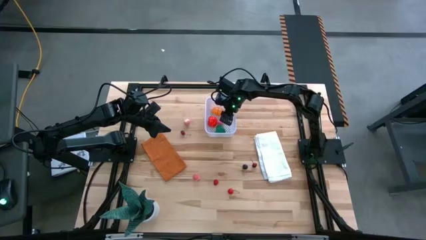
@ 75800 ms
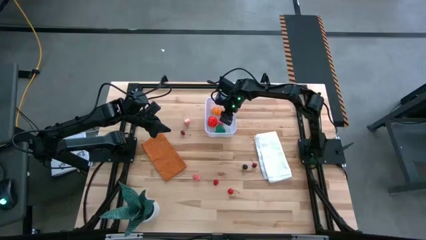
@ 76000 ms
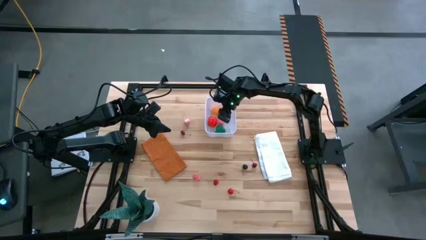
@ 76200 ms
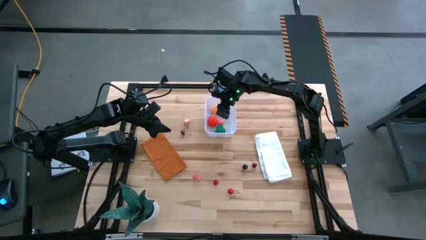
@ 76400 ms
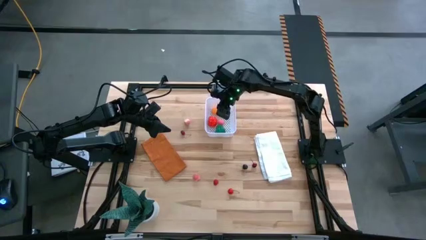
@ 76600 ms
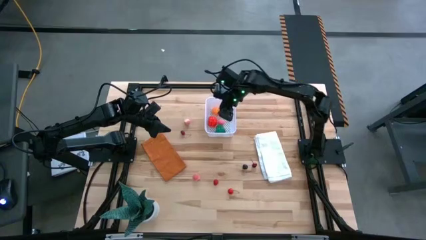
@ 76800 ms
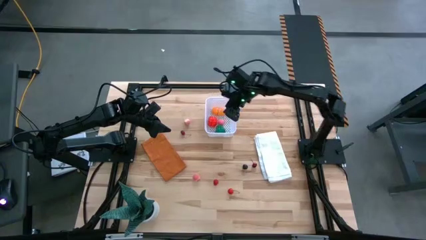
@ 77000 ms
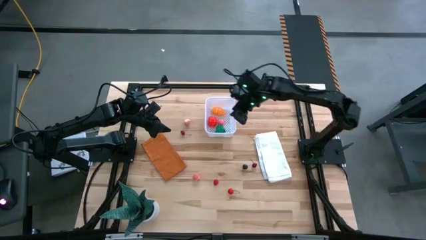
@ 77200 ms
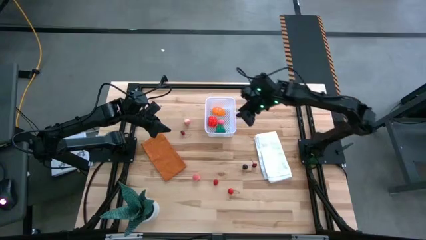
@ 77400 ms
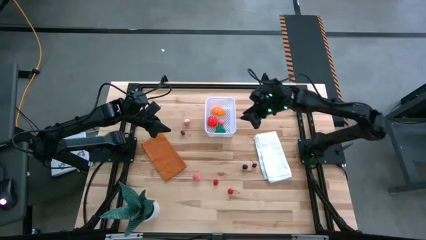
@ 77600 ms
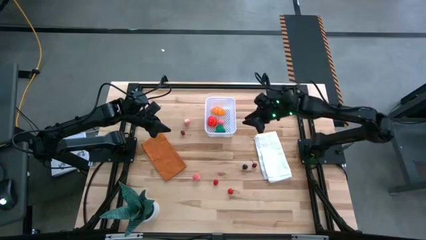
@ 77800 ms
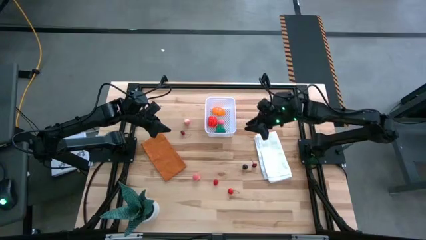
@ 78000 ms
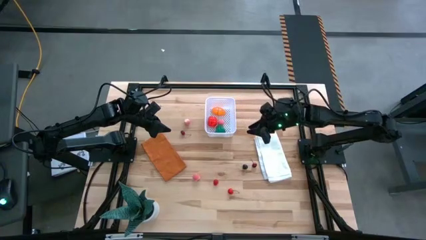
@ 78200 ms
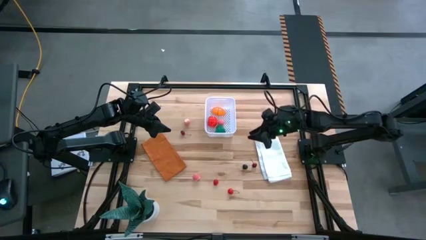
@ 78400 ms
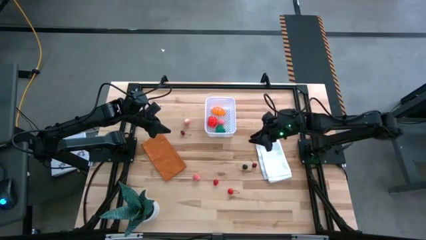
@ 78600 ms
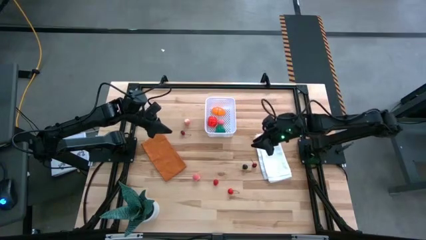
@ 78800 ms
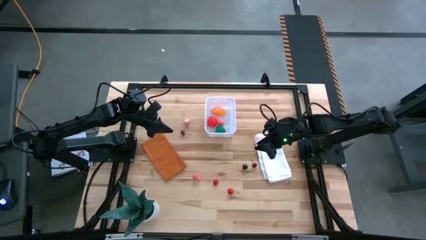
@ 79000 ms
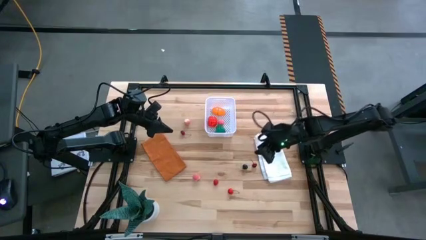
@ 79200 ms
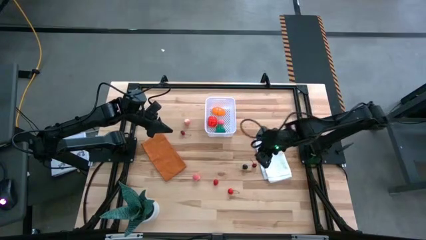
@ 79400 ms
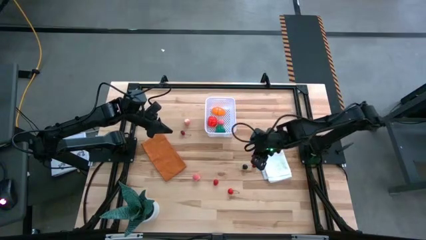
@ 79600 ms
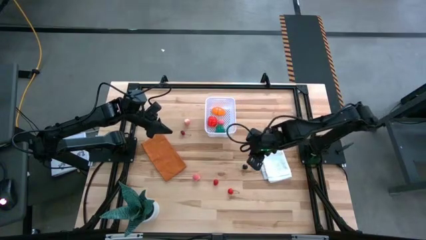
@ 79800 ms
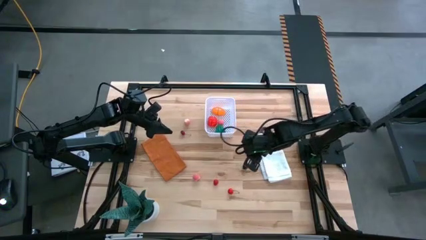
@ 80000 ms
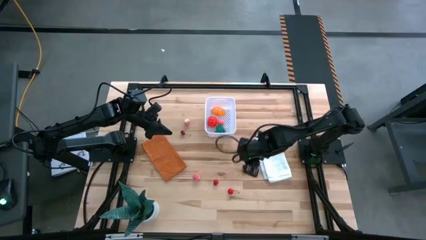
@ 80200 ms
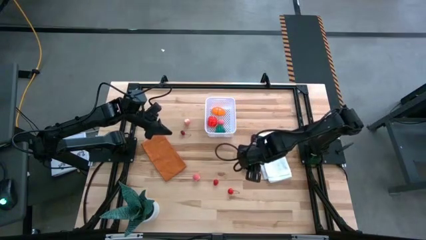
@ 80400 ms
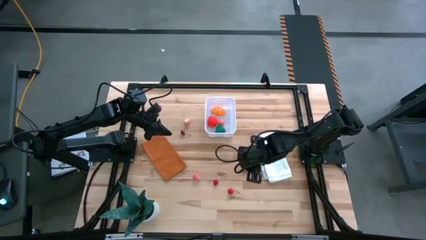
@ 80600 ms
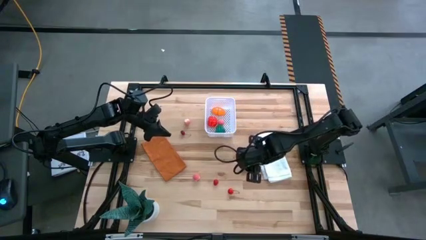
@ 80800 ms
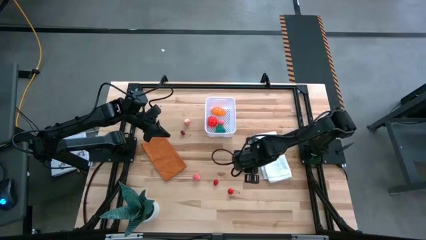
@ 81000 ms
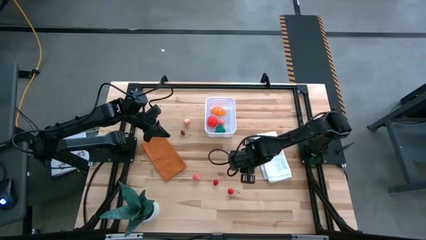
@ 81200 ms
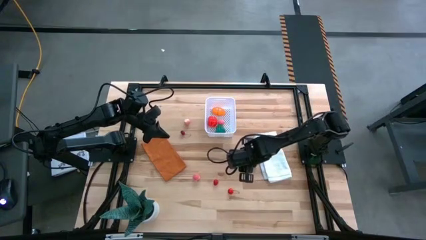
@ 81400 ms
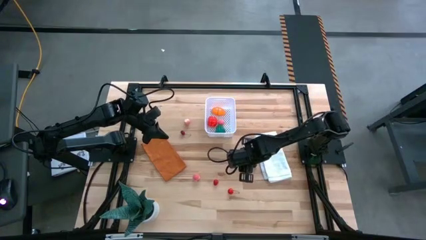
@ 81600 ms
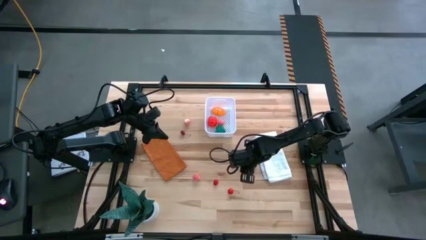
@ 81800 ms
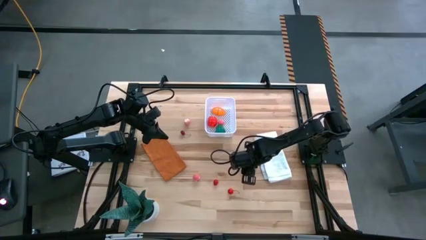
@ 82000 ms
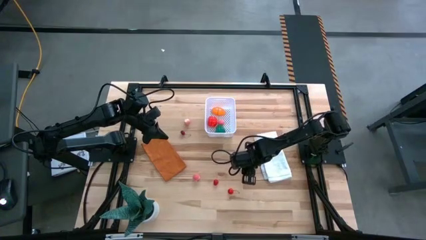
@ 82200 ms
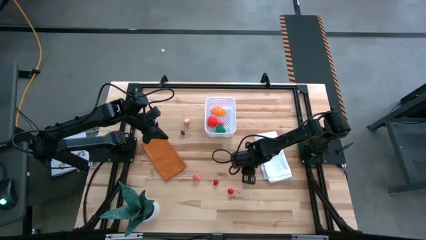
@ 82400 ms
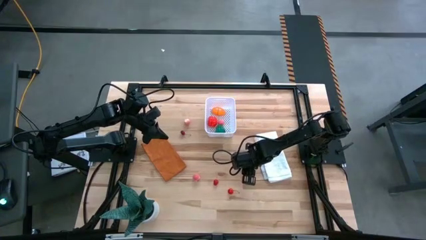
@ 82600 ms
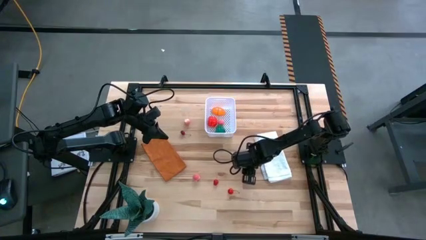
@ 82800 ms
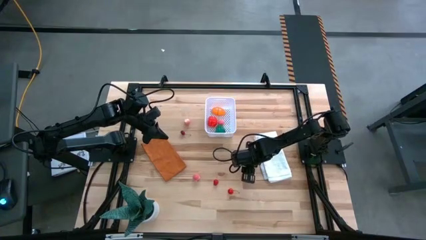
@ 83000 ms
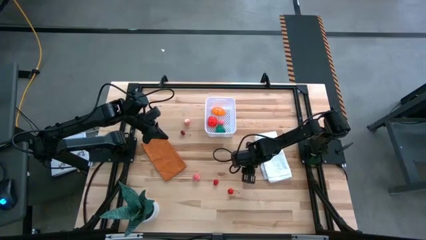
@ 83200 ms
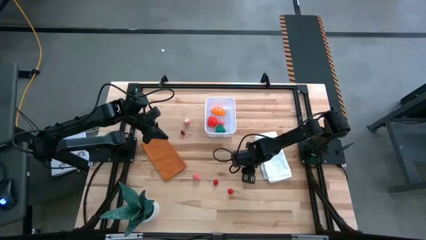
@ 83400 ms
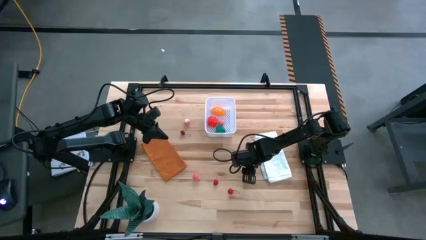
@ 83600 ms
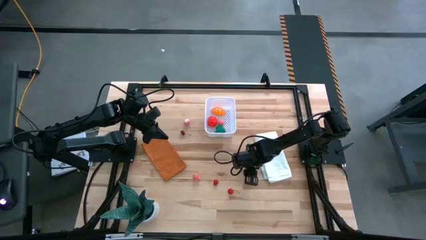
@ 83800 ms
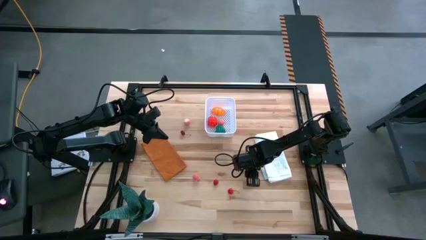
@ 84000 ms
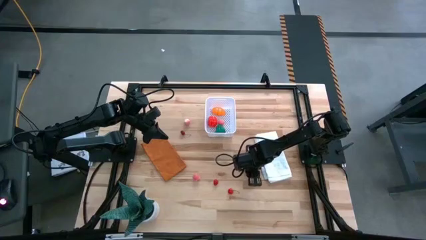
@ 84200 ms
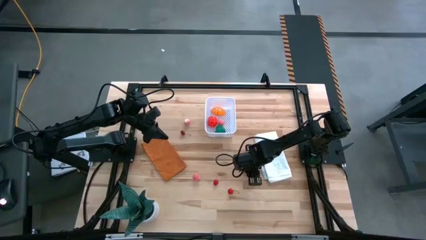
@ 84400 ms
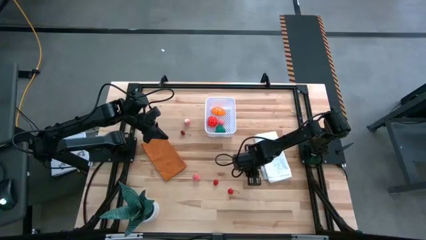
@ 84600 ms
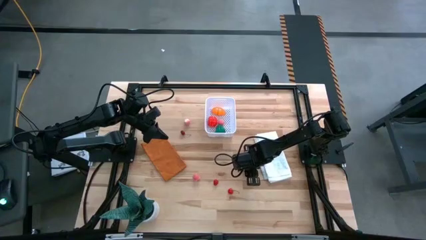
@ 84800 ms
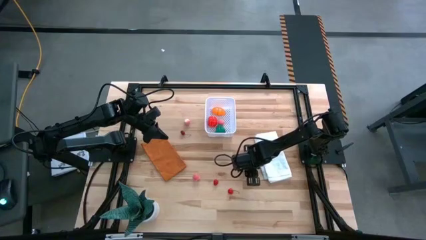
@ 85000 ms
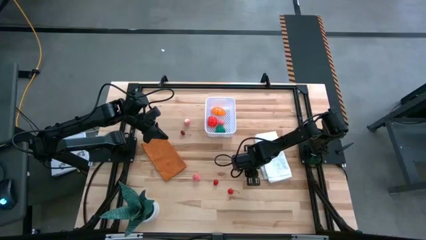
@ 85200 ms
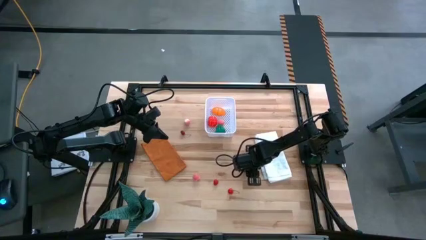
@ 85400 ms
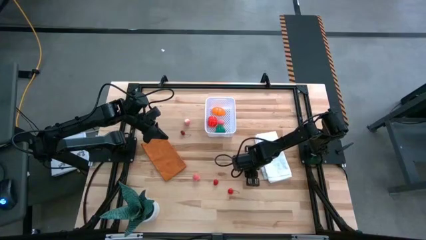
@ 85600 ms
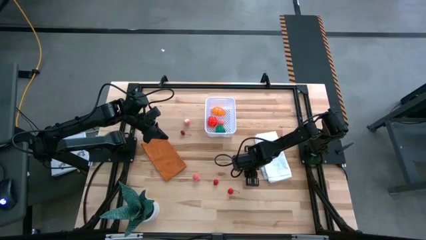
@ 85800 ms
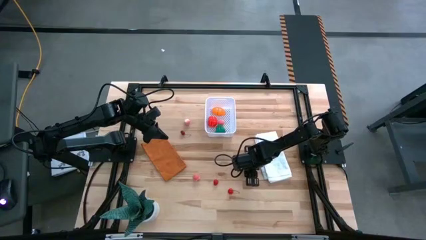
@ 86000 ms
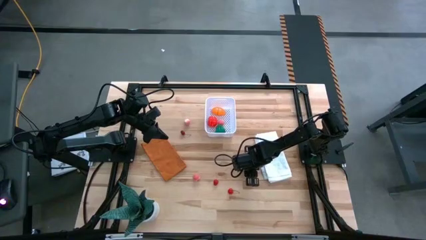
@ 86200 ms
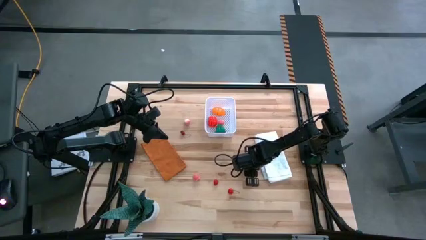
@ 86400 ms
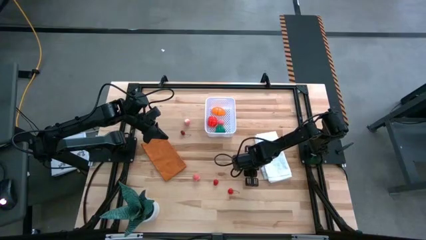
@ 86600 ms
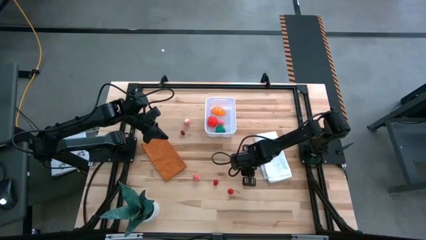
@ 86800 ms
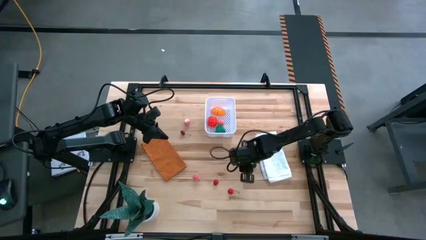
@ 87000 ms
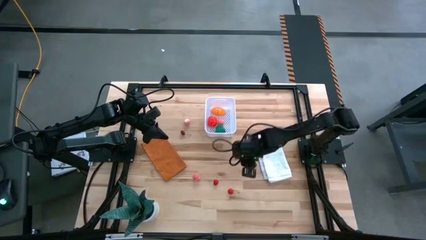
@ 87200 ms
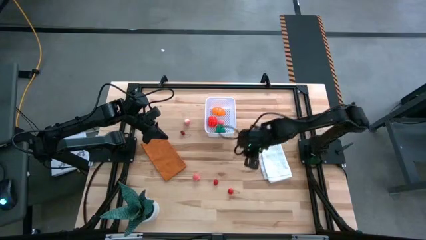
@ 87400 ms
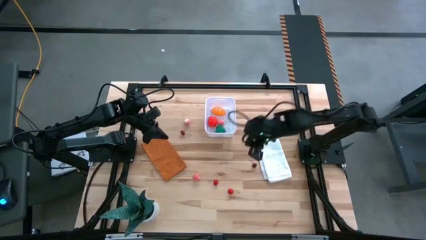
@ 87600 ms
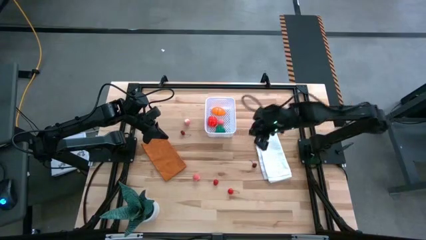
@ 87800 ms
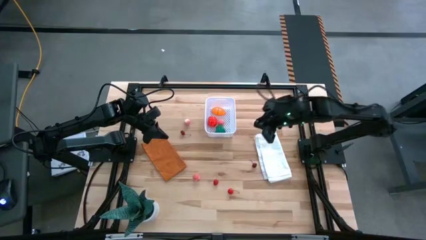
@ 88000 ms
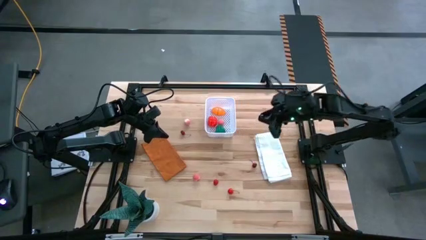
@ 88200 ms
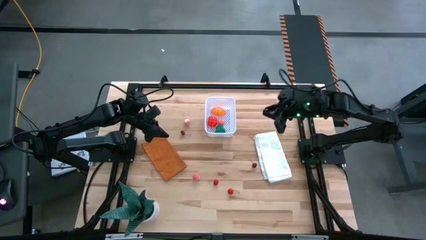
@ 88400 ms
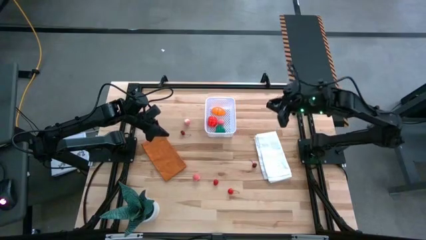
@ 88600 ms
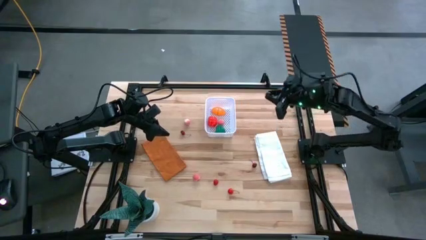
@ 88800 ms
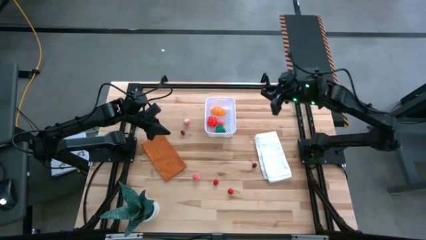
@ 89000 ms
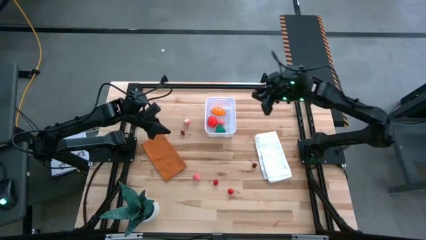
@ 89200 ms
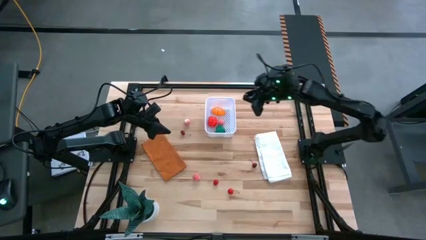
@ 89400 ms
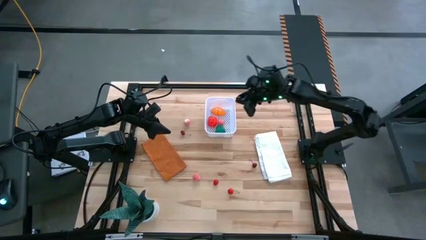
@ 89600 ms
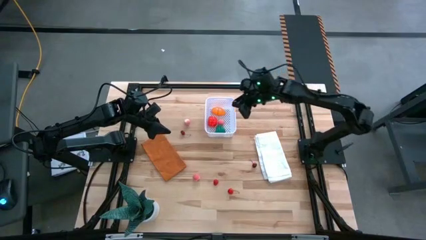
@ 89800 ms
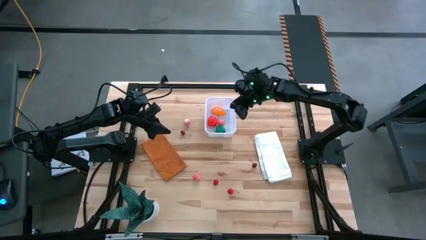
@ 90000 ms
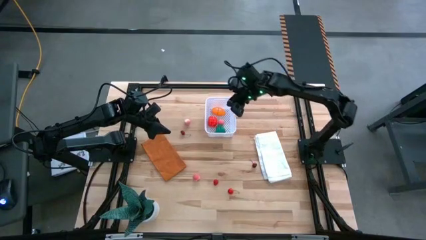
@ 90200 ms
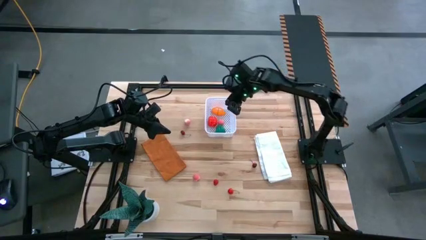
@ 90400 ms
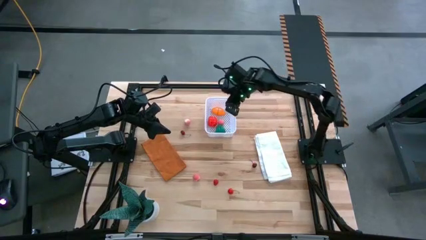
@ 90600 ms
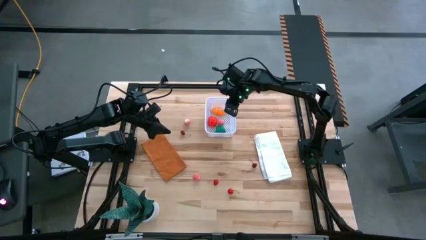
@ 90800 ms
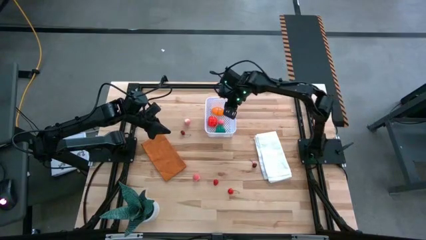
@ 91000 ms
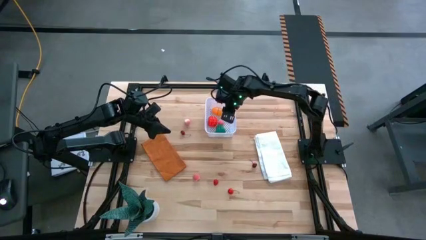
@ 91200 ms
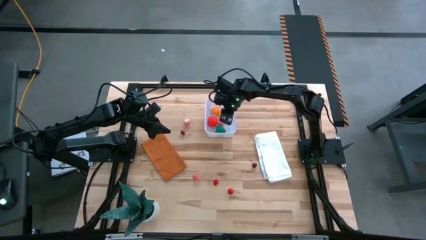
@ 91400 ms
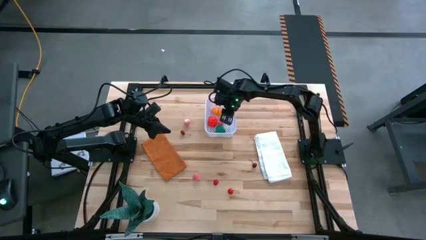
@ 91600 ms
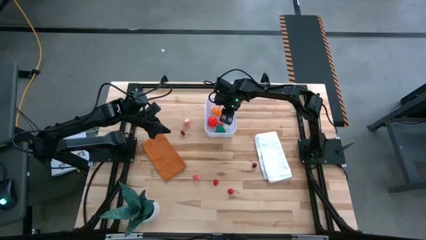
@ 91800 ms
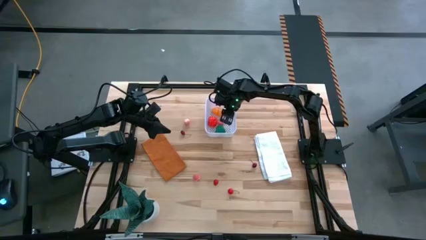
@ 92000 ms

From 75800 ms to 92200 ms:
Task: Pick and placing Produce into tupperware
Put the black cherry into the white bin
